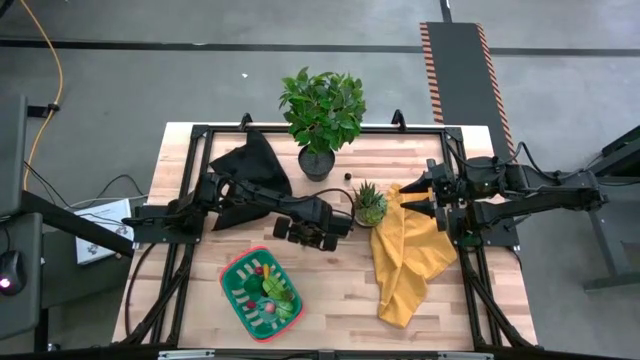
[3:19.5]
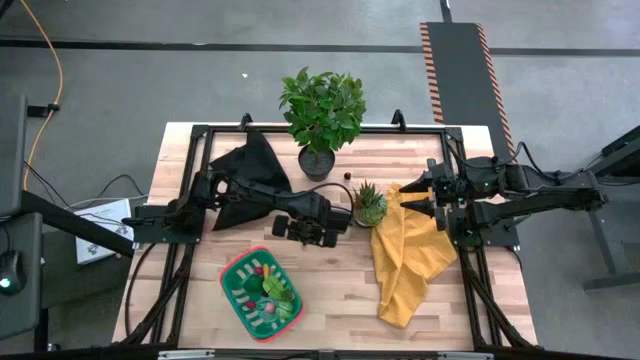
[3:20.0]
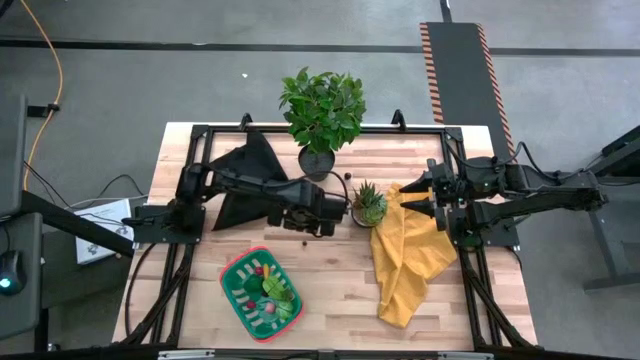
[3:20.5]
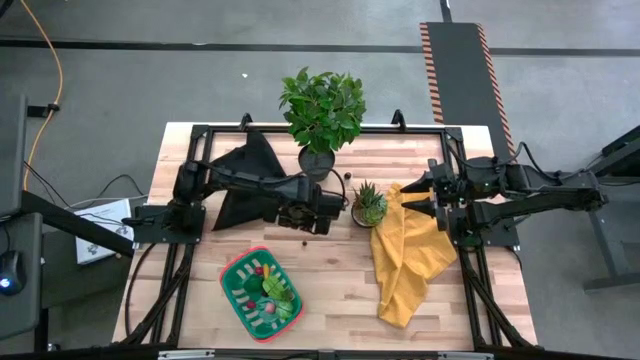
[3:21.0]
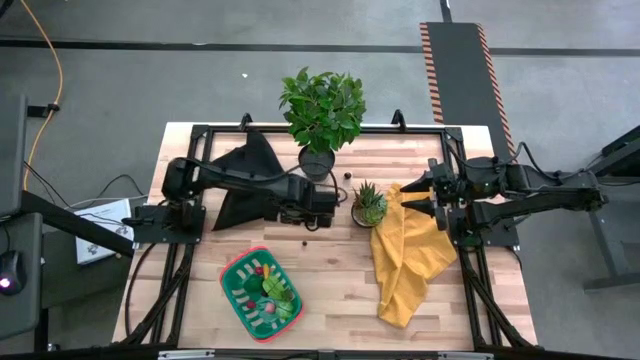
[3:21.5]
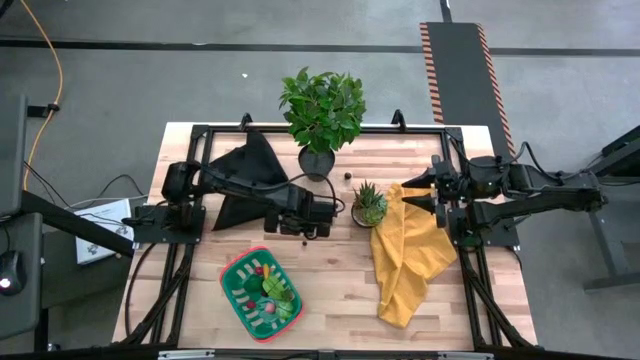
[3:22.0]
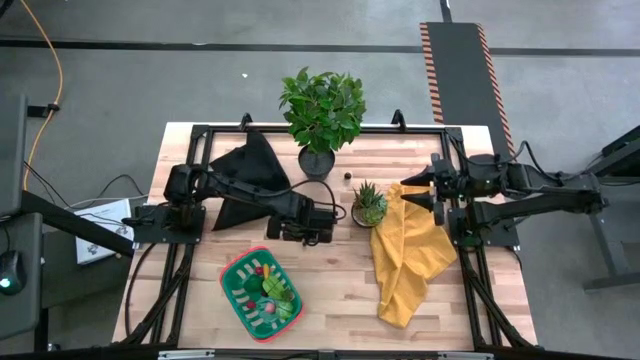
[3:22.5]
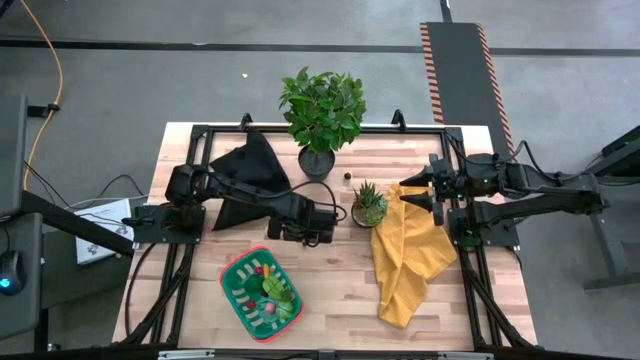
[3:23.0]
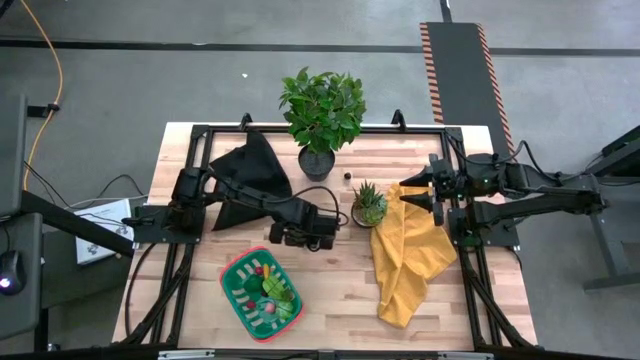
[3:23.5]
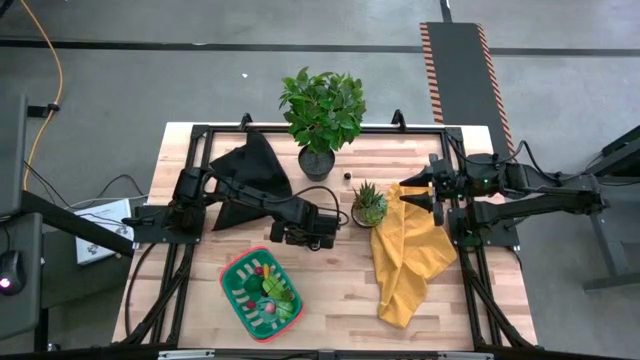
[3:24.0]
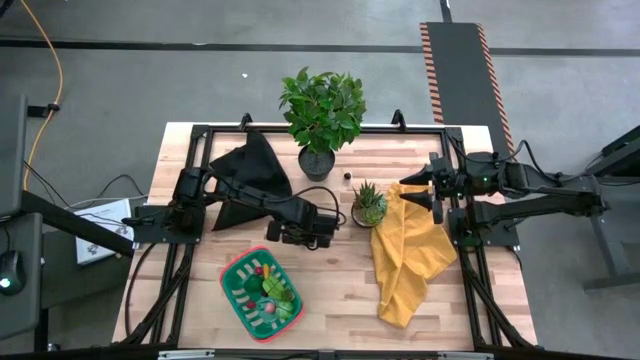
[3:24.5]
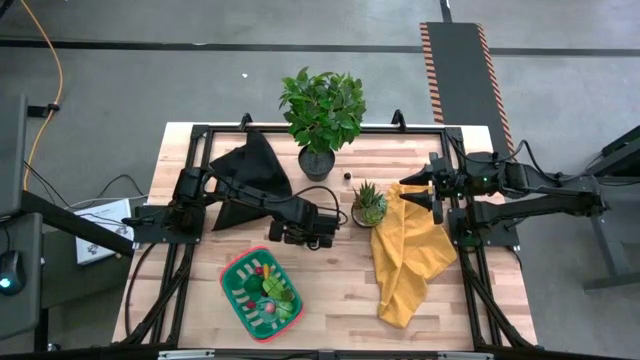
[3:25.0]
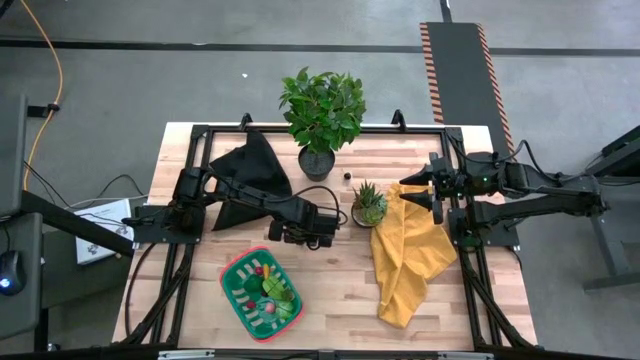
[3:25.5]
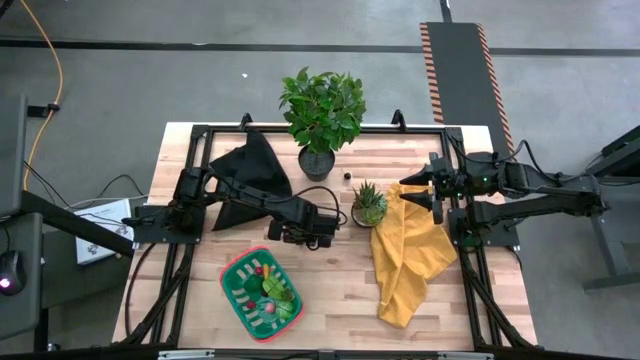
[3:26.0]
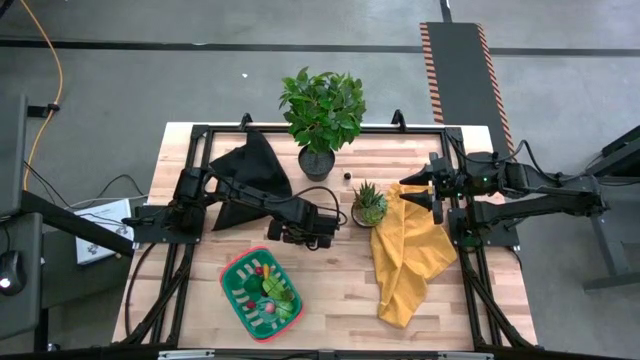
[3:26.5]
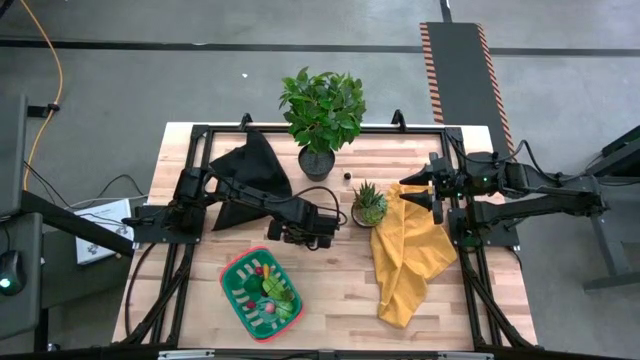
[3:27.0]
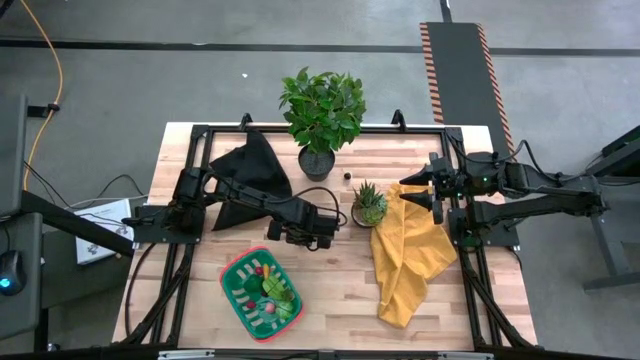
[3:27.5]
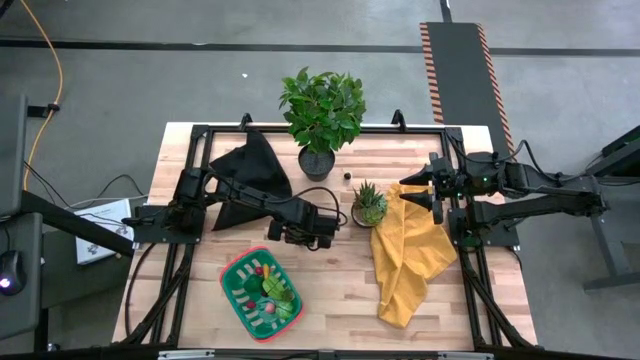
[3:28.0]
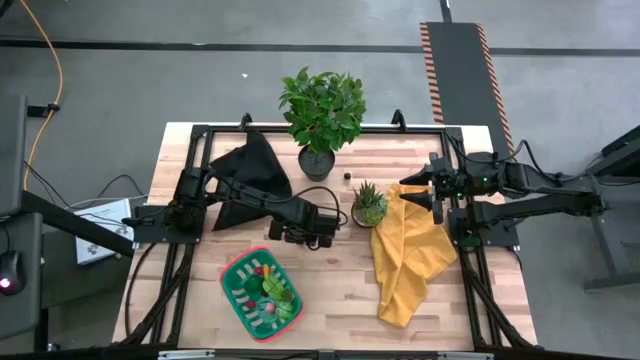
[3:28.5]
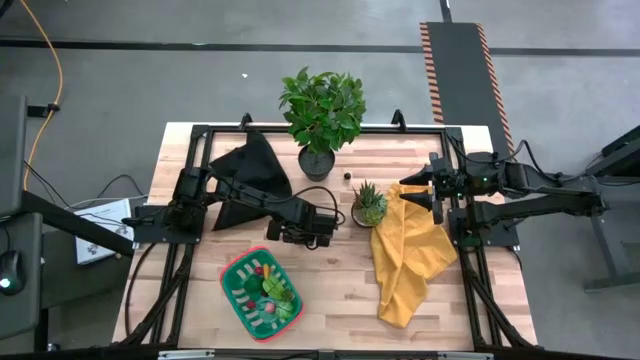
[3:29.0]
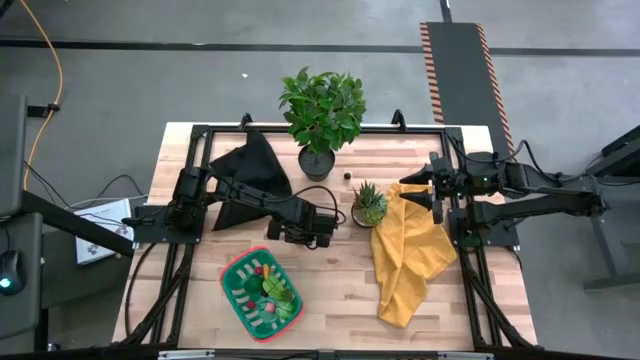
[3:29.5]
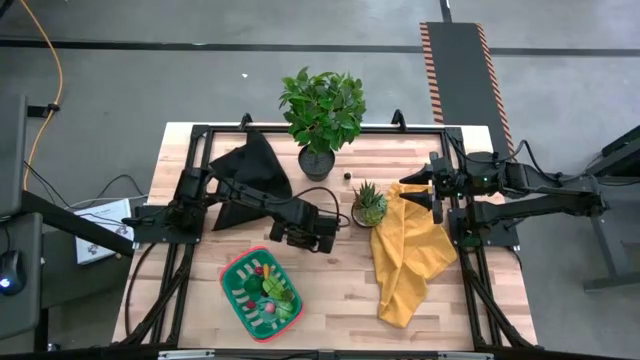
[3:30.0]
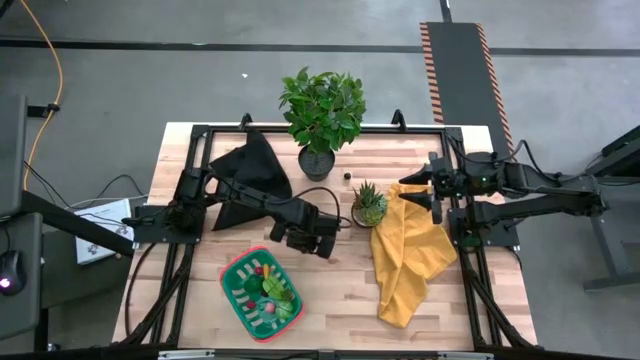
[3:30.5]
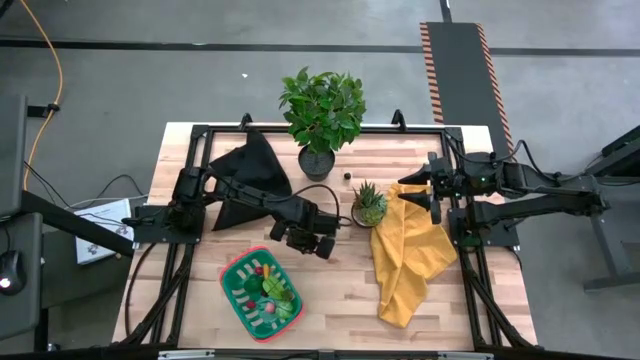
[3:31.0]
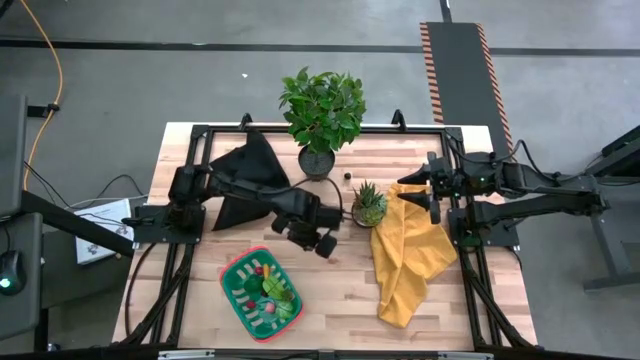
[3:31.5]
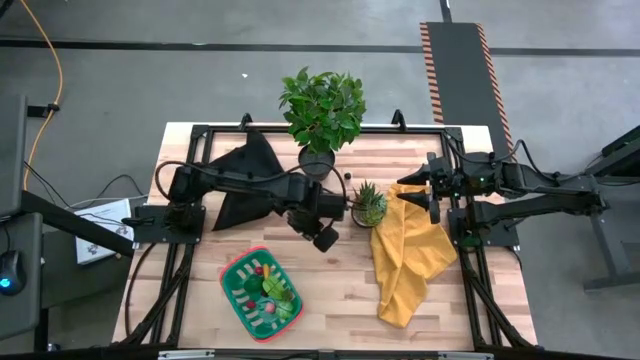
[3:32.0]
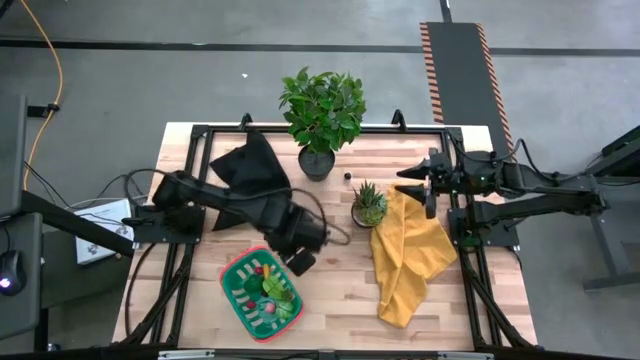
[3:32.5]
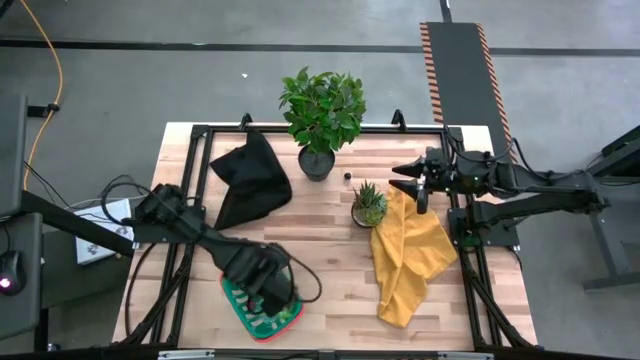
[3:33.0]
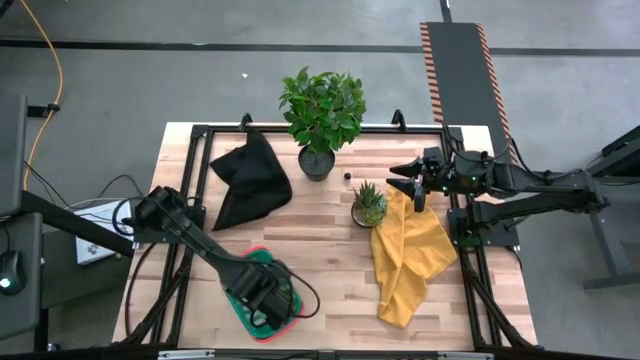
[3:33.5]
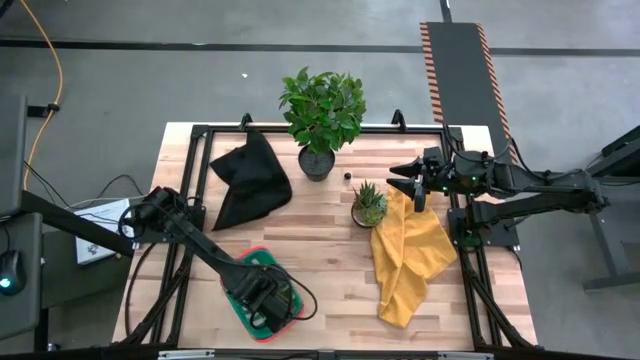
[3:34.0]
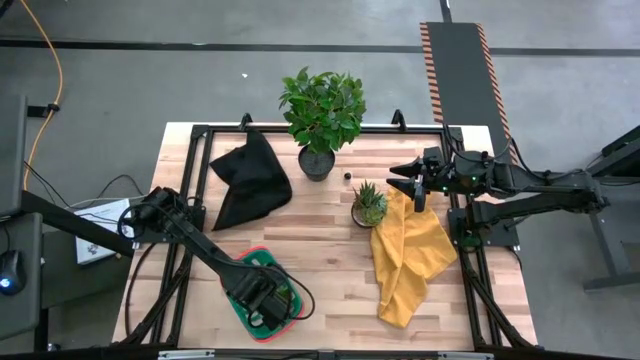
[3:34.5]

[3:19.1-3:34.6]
Task: Pick and placing Produce into tupperware
Put the blueberry into the blue basket

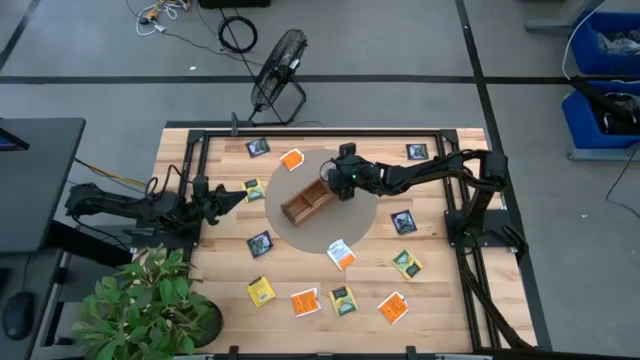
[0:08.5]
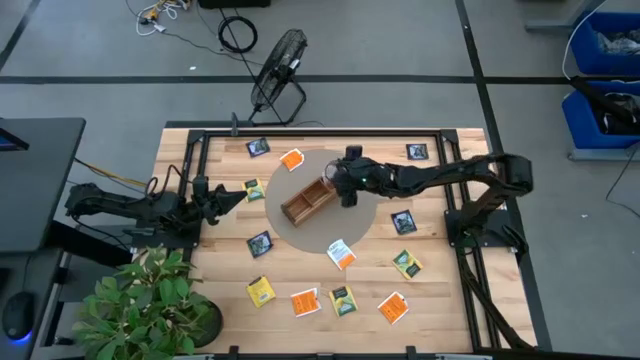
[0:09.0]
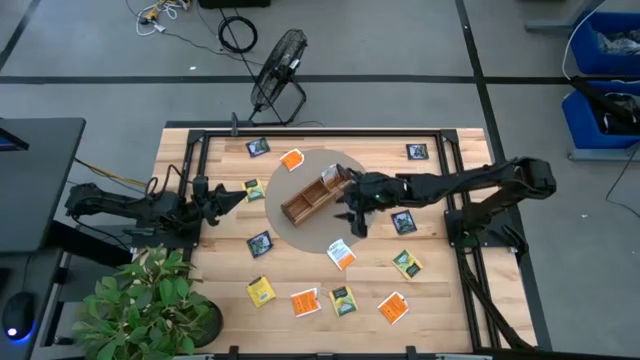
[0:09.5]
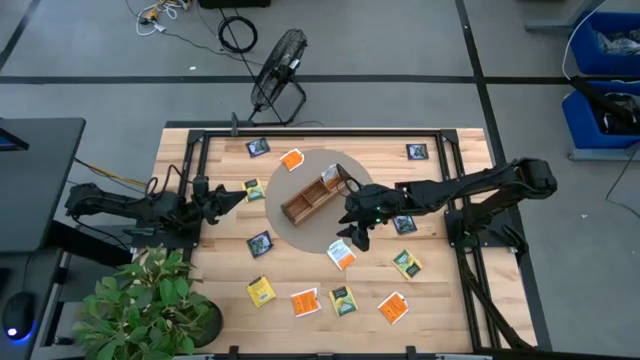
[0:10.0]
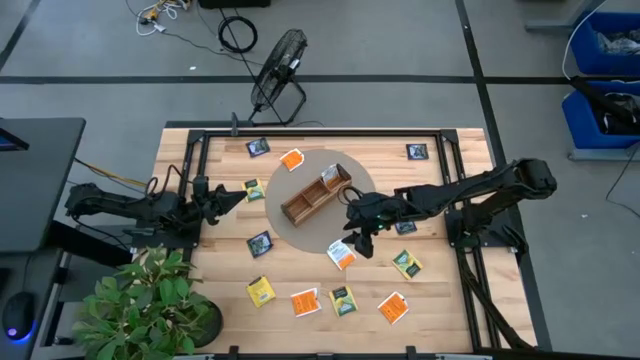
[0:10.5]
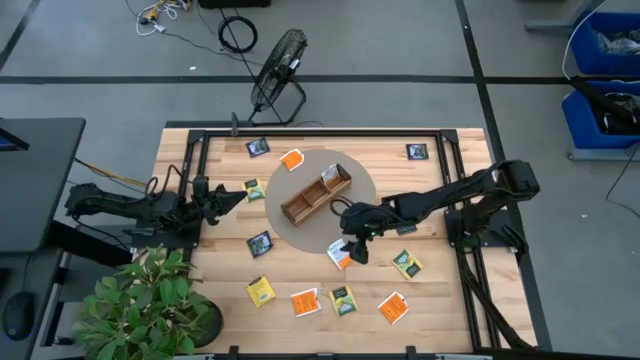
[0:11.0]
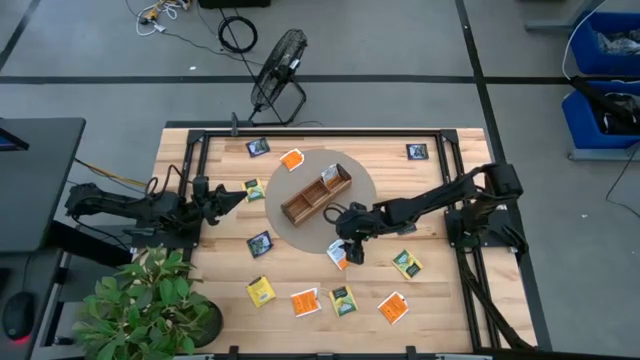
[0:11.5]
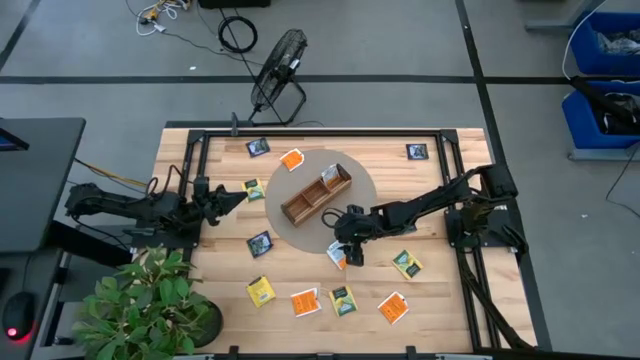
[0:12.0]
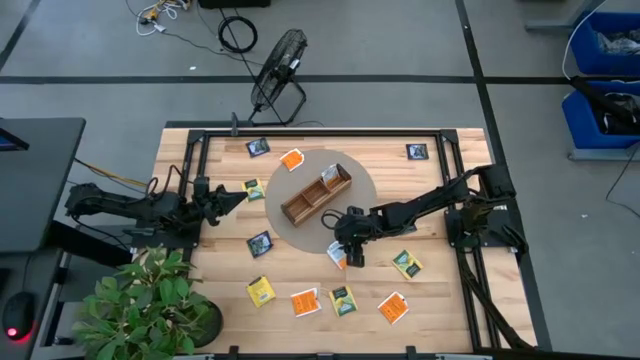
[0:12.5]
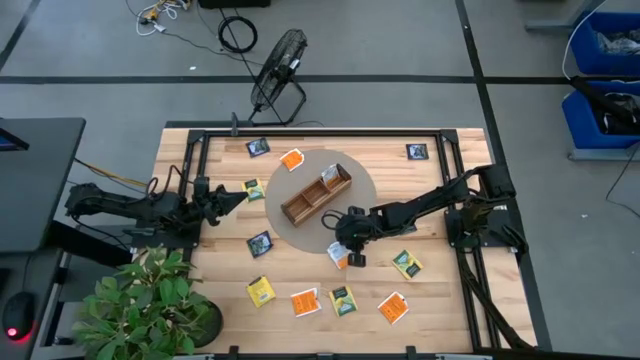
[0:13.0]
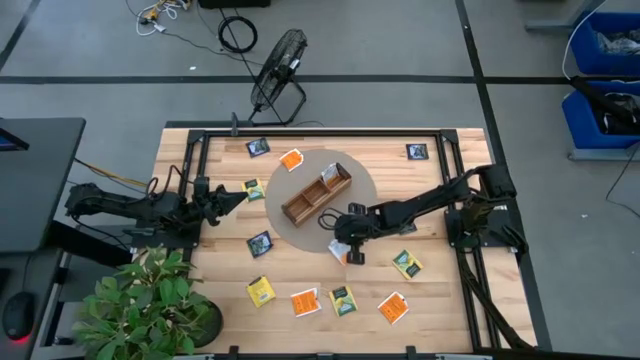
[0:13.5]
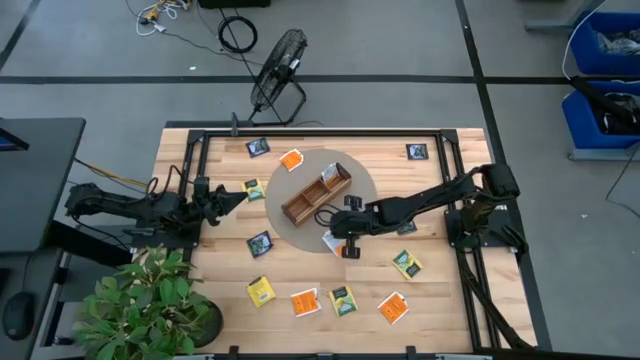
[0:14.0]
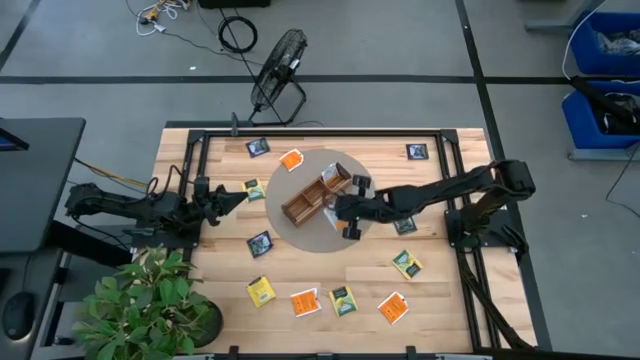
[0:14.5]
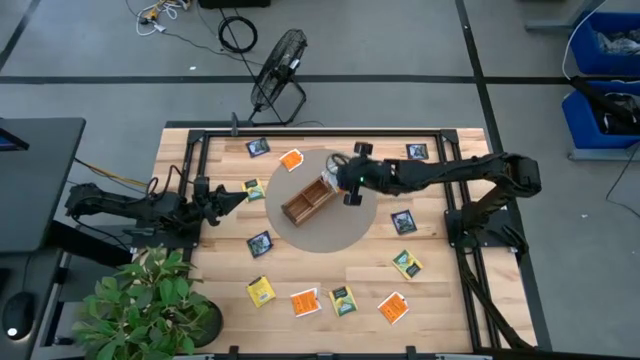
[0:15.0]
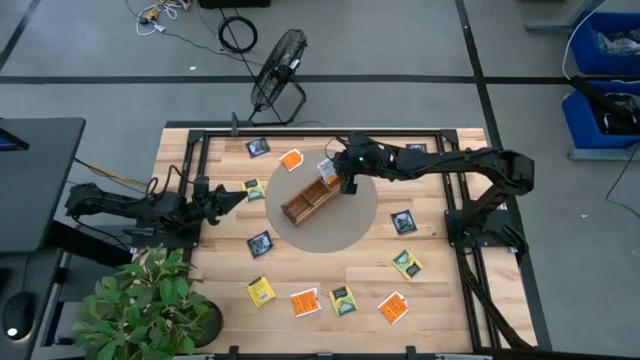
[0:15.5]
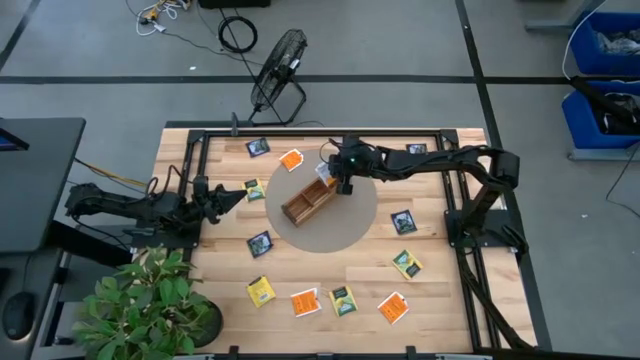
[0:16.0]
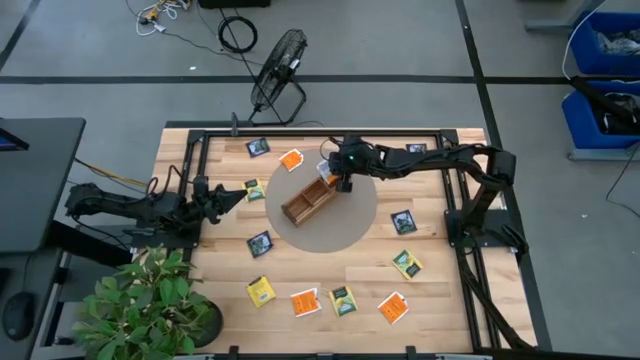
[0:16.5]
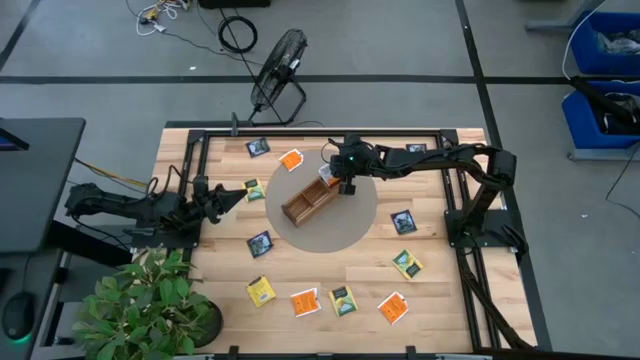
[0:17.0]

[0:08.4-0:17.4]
Task: Pick & Place Tea
Put the orange tea bag into the right section of the wooden organizer
